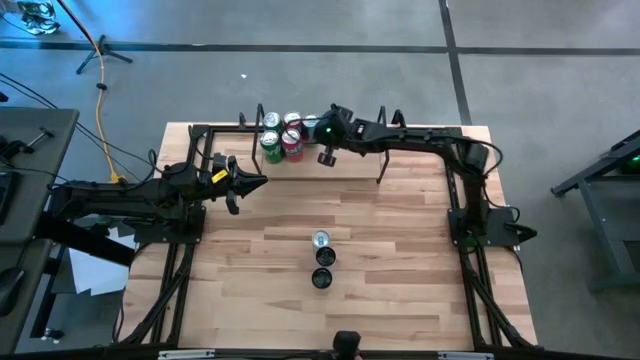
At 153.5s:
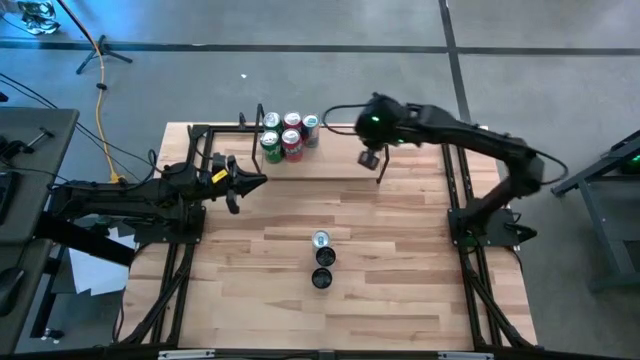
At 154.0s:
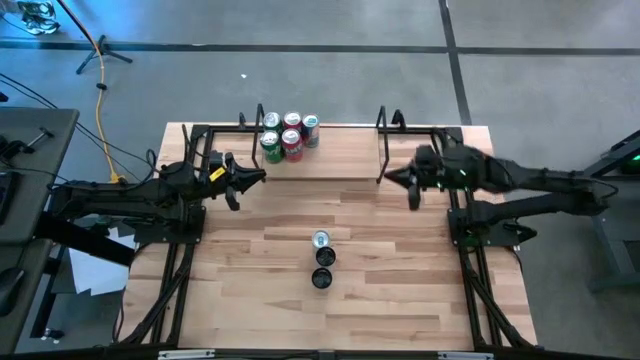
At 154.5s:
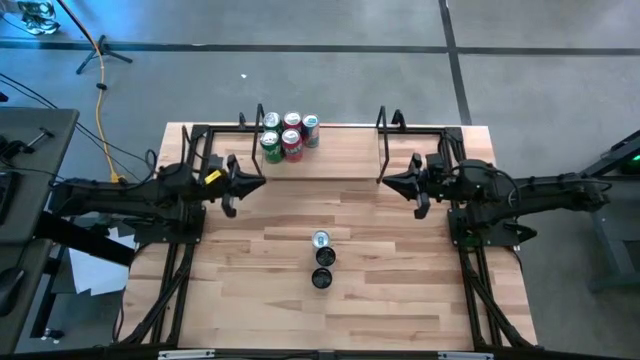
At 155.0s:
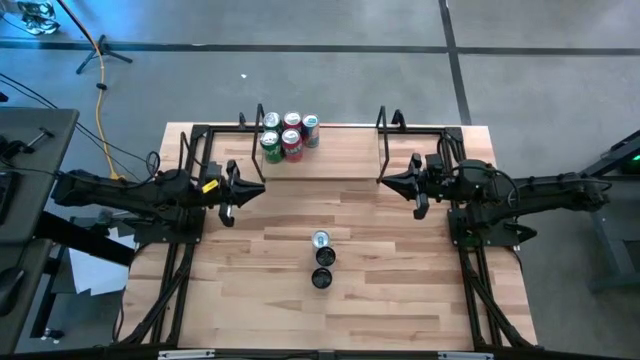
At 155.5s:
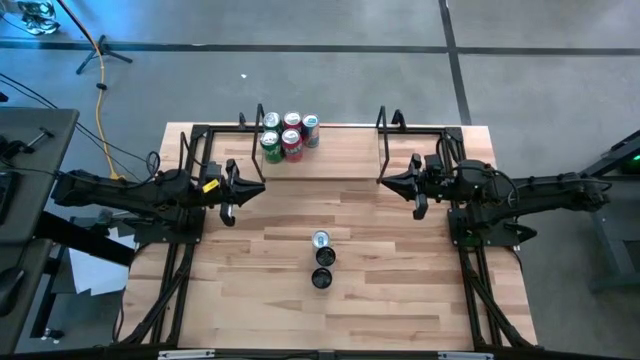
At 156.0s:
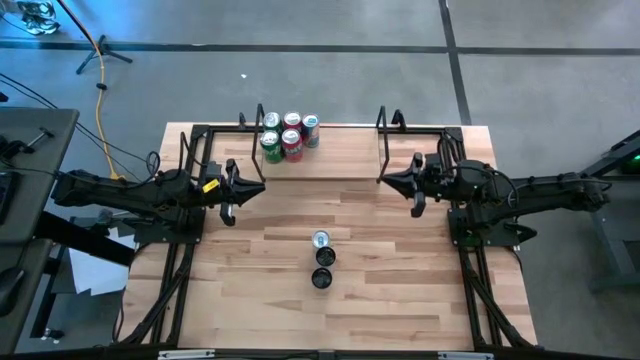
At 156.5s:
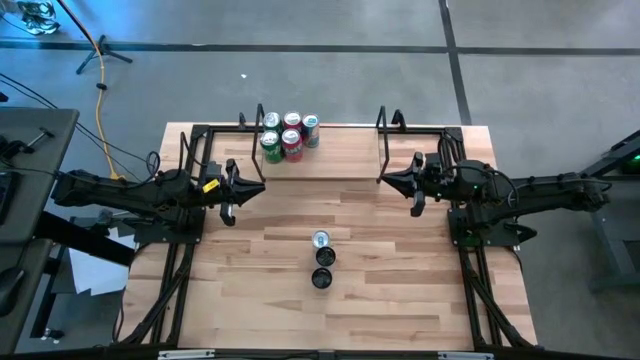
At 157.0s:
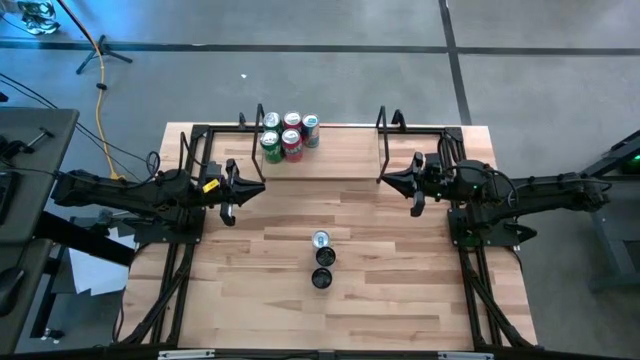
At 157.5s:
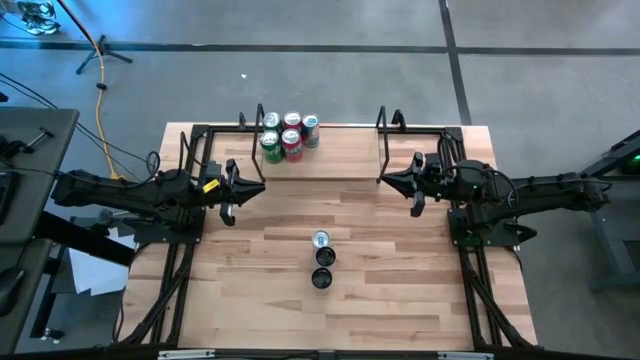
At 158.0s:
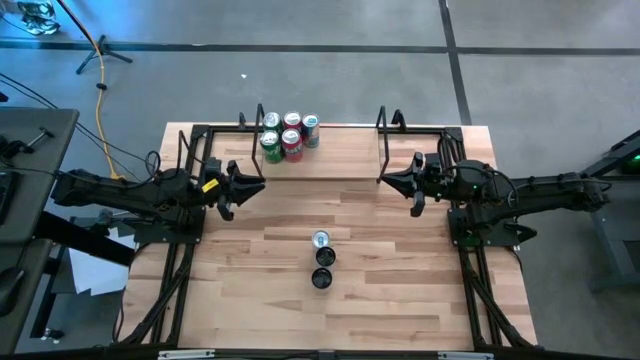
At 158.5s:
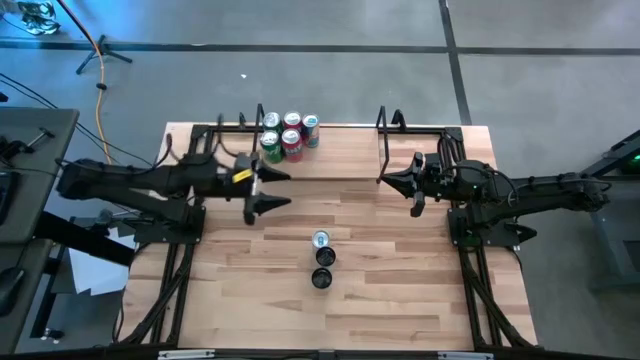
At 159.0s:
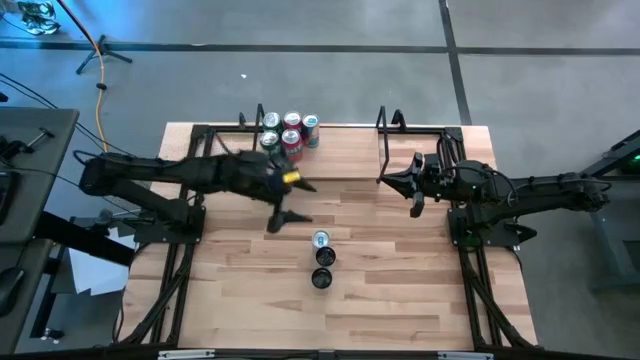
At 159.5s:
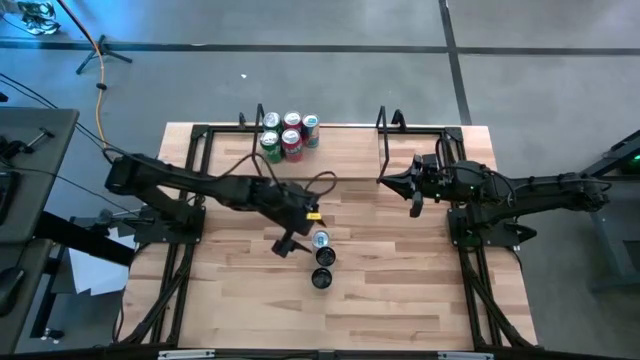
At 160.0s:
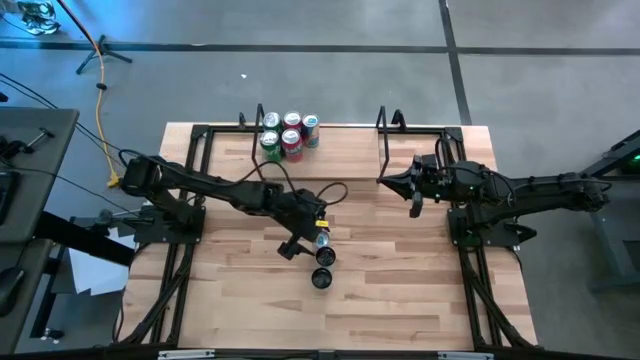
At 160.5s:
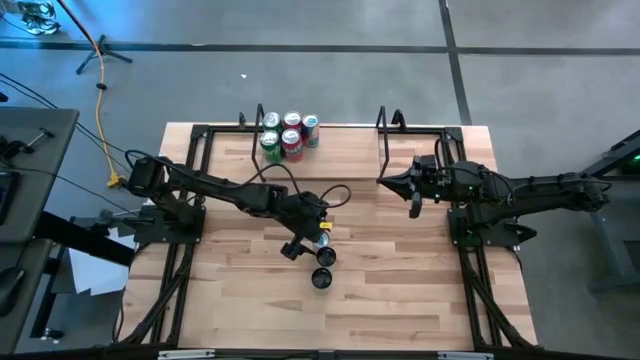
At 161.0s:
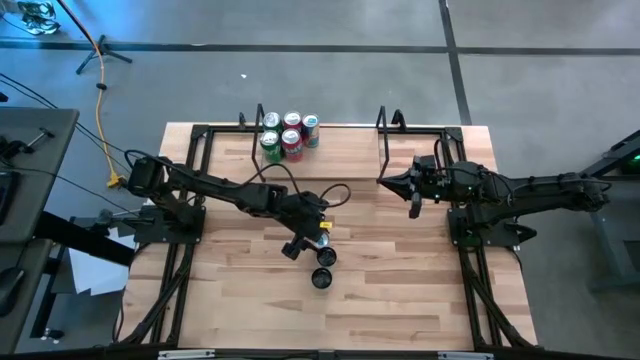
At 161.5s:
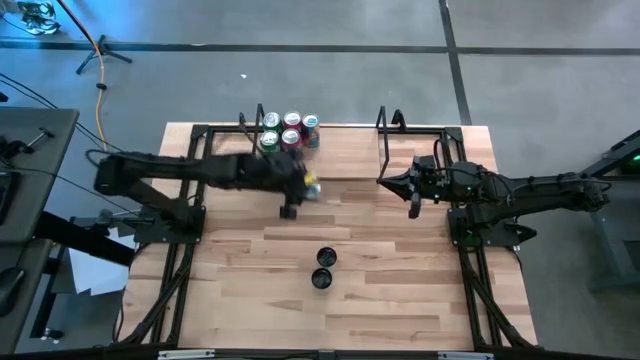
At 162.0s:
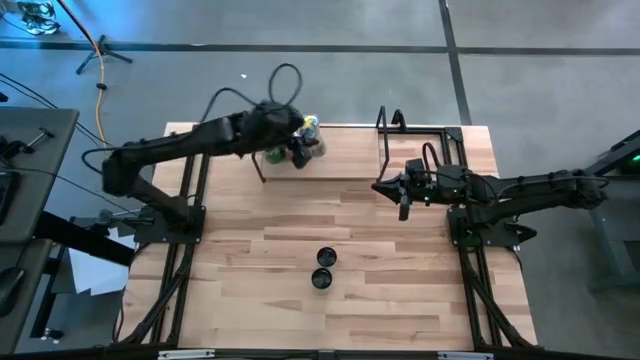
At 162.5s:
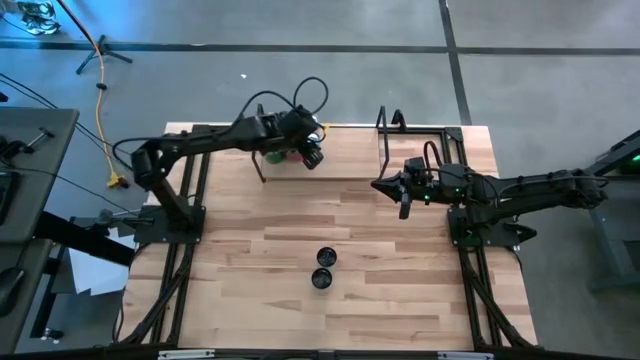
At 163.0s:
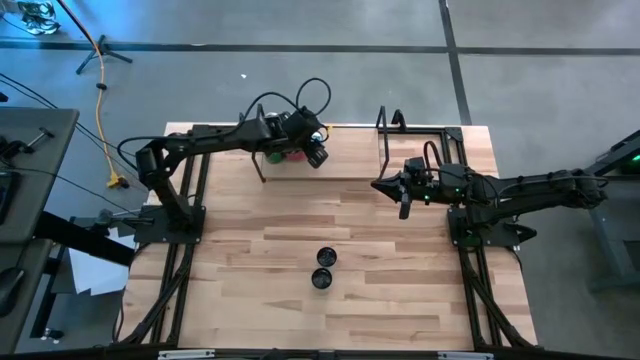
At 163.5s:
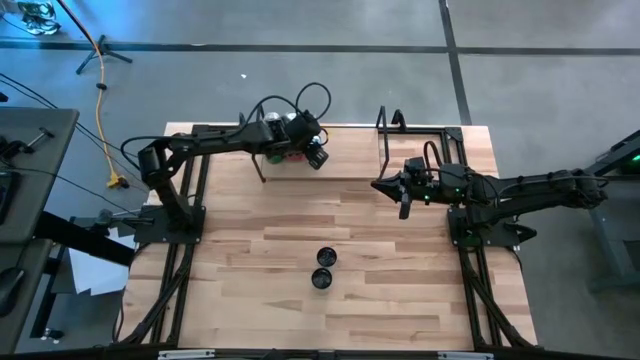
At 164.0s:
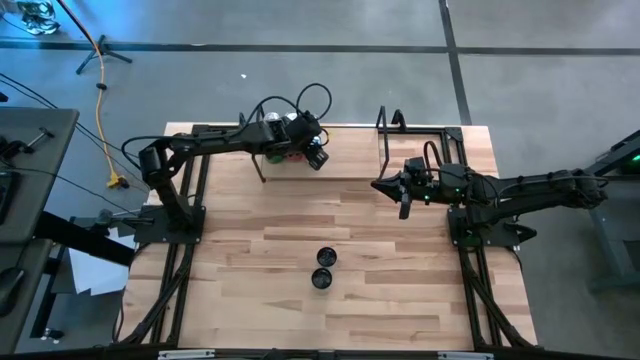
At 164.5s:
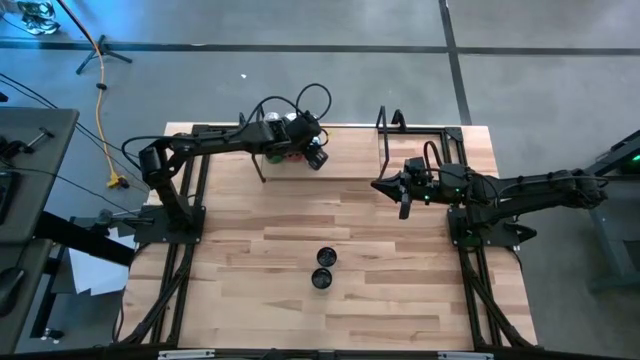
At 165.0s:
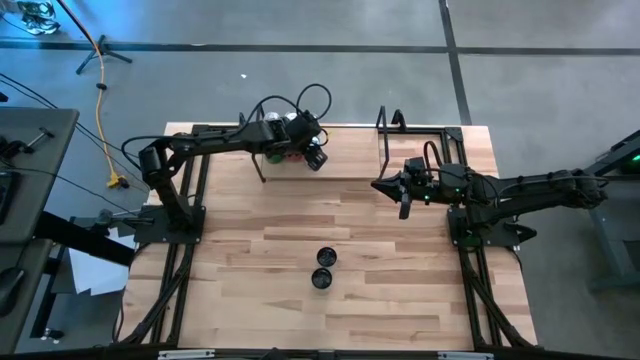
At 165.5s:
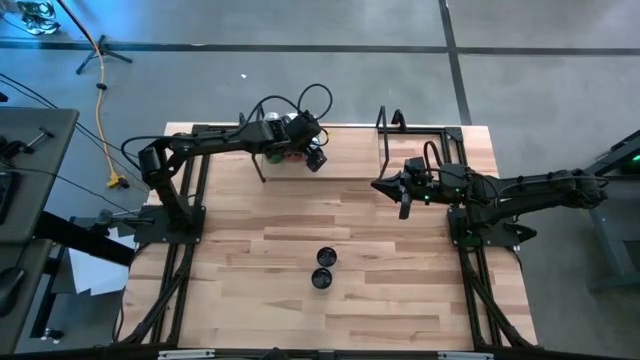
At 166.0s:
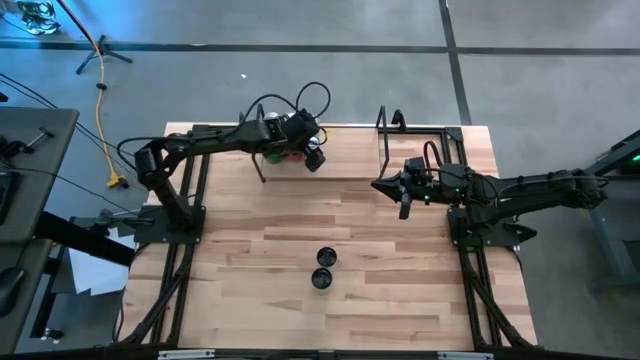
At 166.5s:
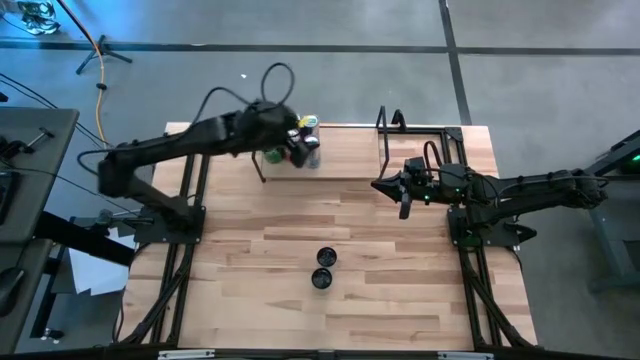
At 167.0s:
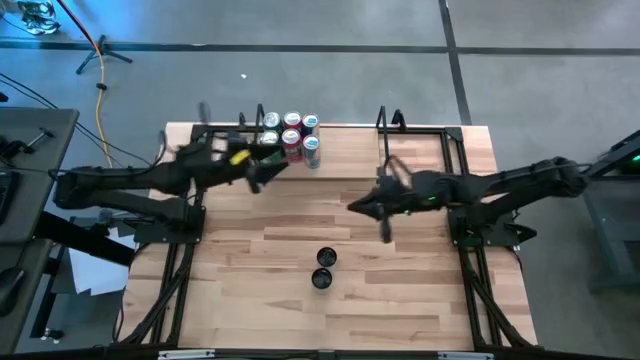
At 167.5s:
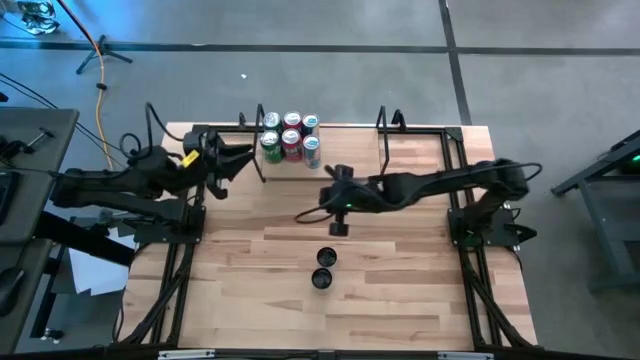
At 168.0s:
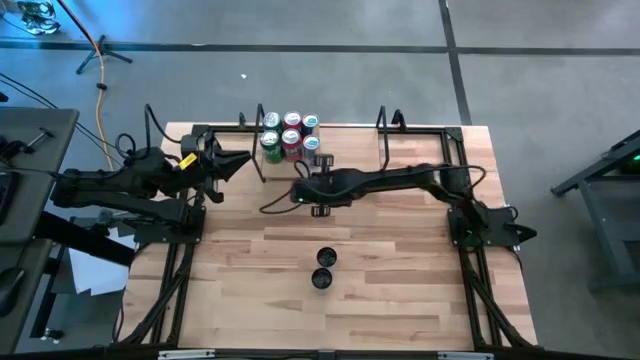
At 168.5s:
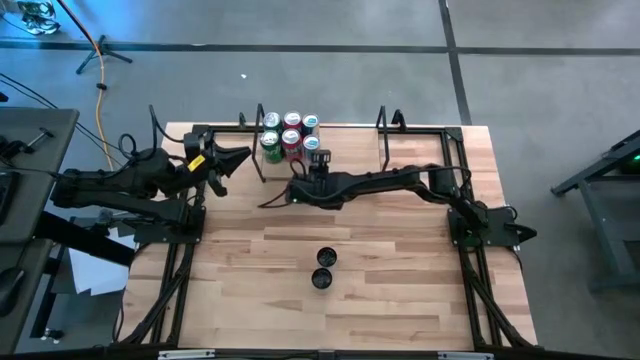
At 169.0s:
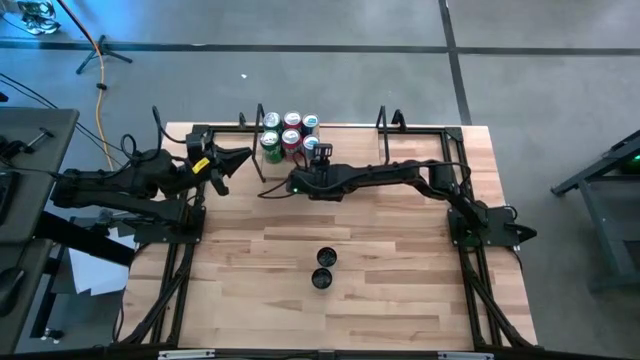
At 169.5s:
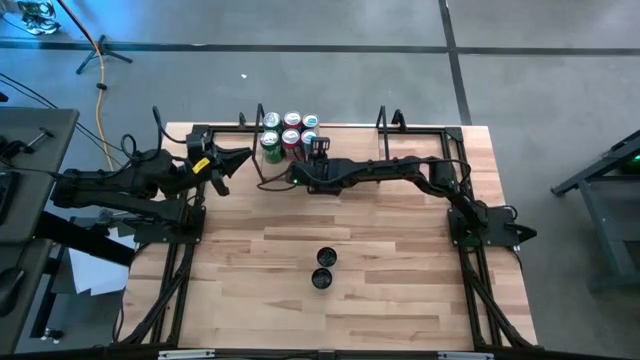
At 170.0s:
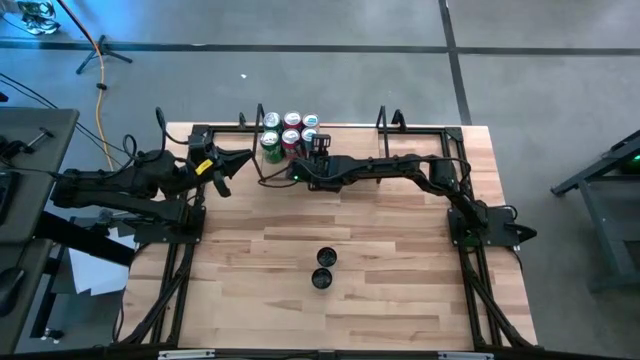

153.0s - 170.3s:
Task: Place canned beverage on shelf
Put the blue soda can on the shelf aligned with the blue soda can

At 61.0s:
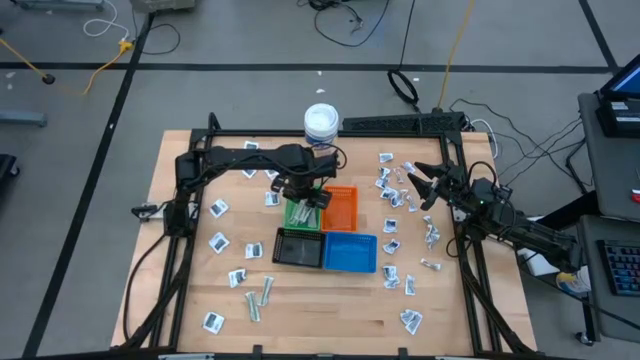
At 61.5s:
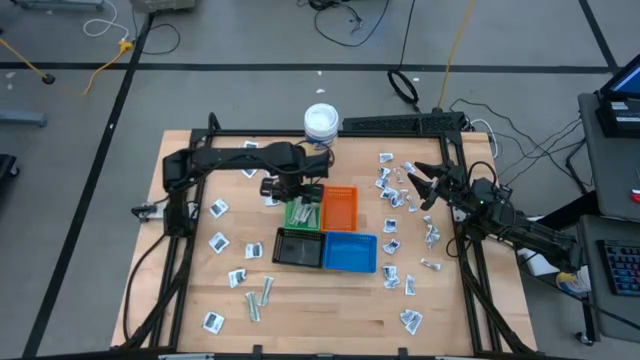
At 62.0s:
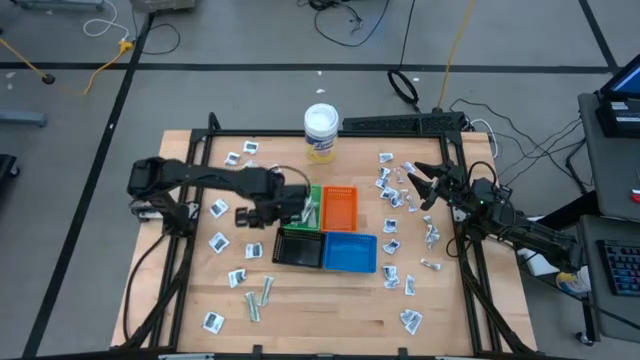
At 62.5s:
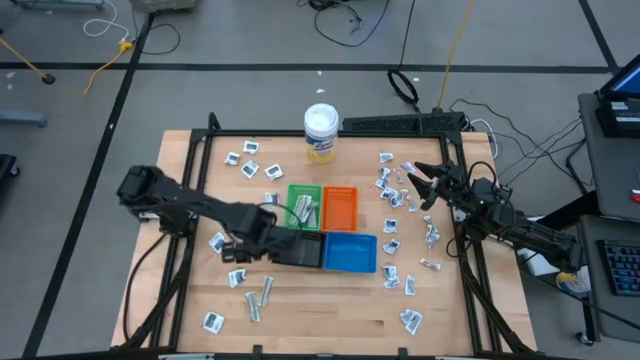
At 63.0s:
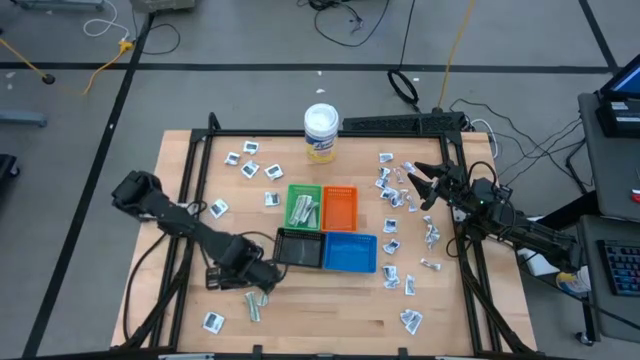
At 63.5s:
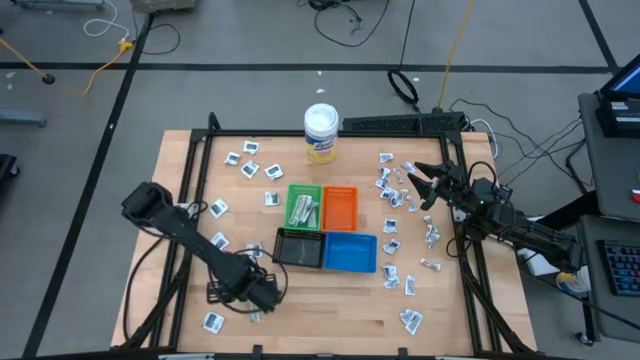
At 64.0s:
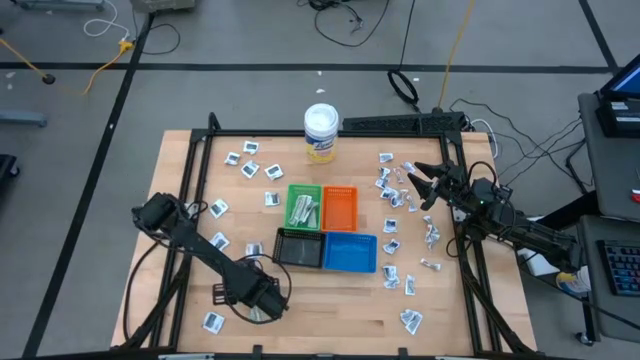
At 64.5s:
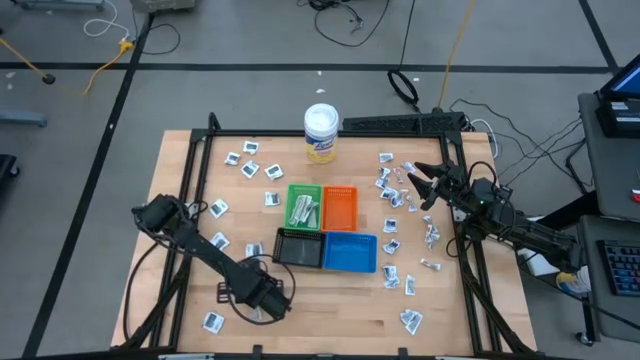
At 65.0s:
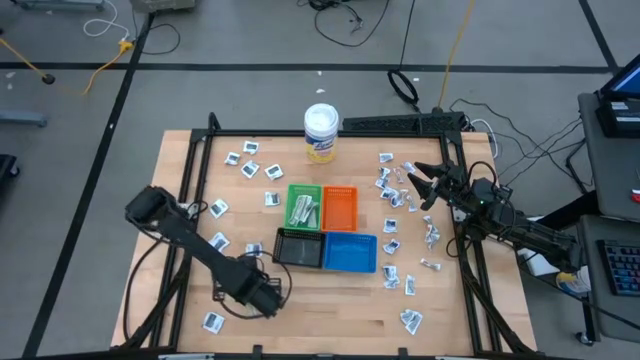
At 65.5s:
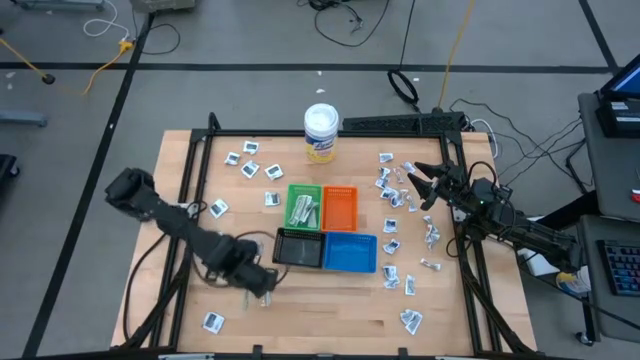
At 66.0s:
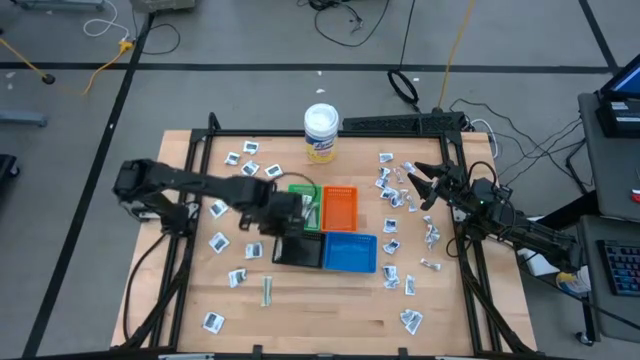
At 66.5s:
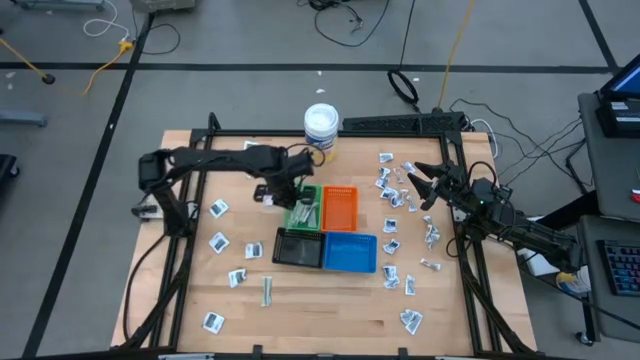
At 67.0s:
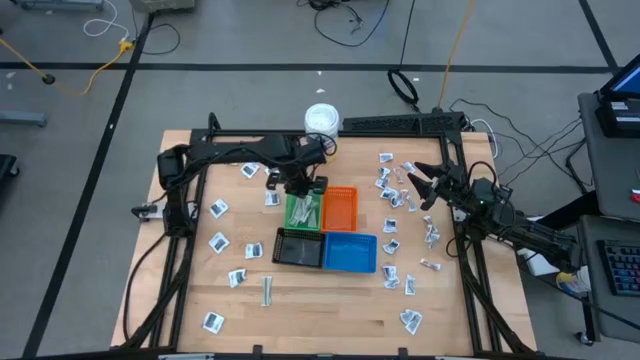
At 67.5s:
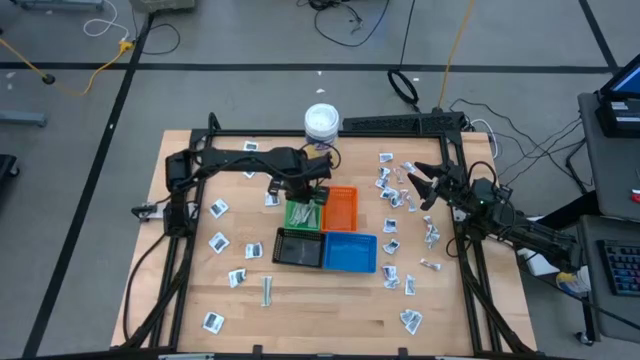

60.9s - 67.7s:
Task: Pick & Place First Aid Supplies
Put the bandage pack into the green bin
